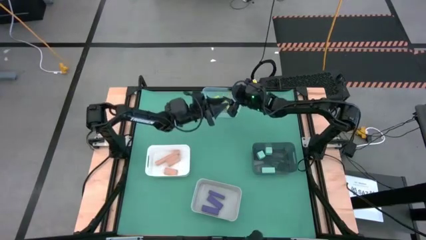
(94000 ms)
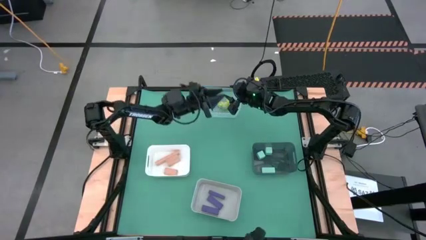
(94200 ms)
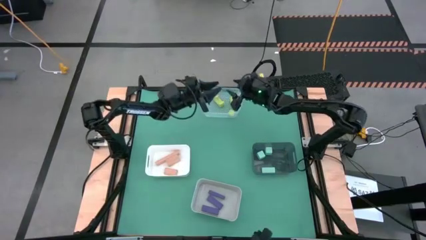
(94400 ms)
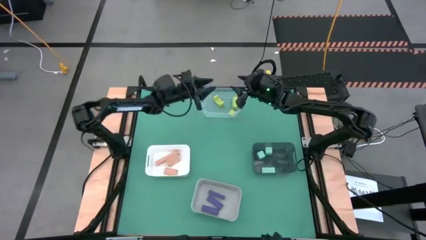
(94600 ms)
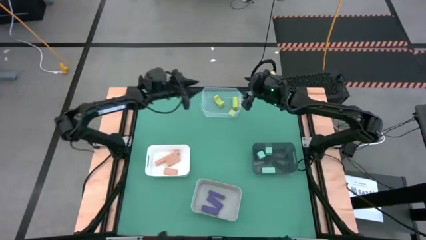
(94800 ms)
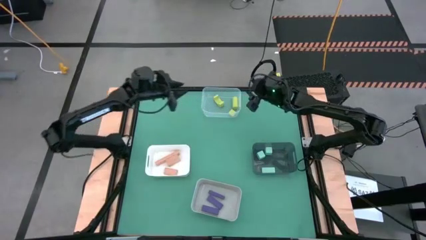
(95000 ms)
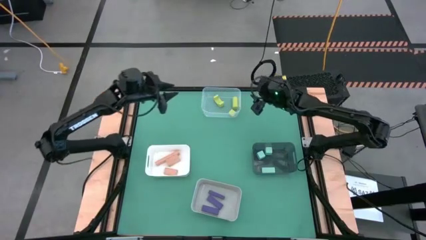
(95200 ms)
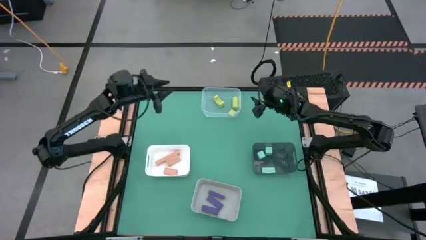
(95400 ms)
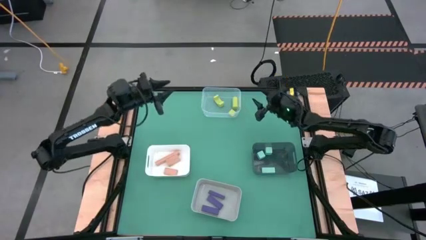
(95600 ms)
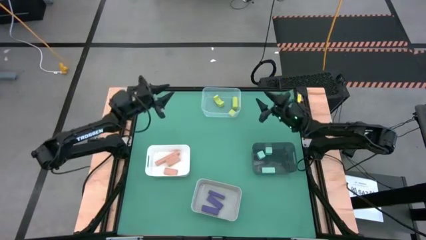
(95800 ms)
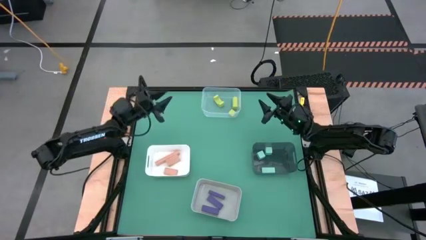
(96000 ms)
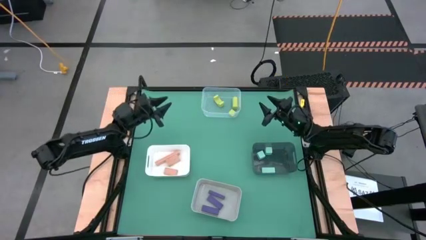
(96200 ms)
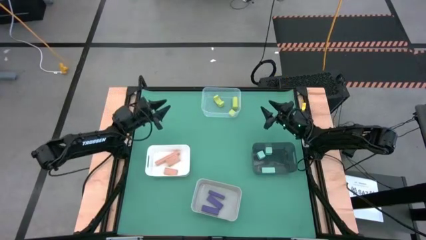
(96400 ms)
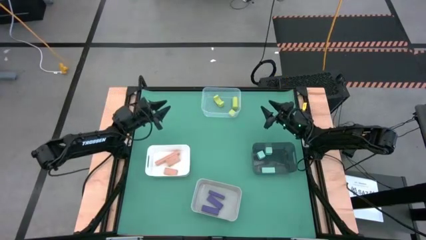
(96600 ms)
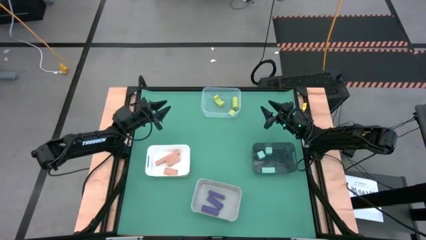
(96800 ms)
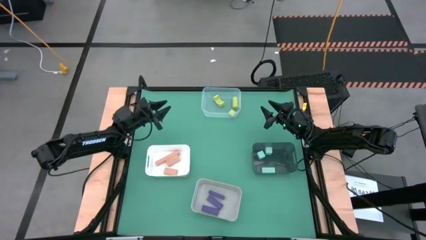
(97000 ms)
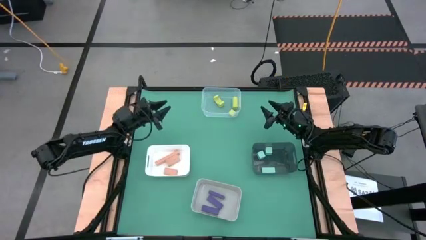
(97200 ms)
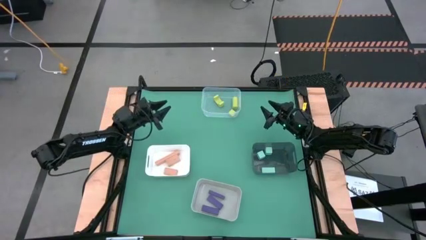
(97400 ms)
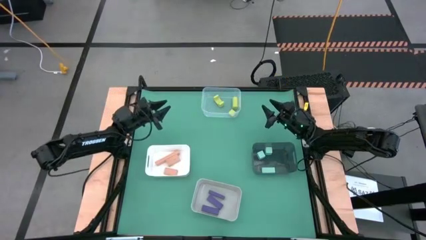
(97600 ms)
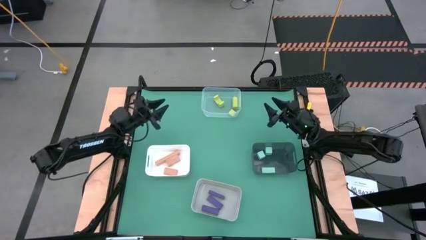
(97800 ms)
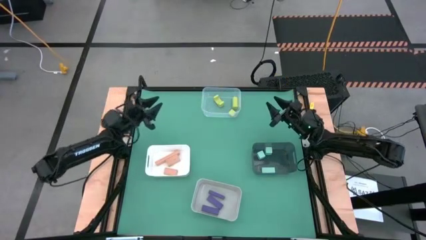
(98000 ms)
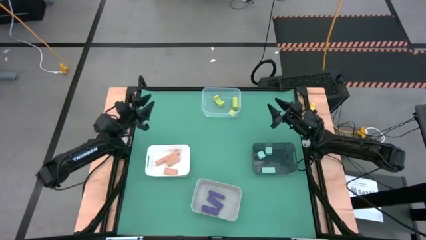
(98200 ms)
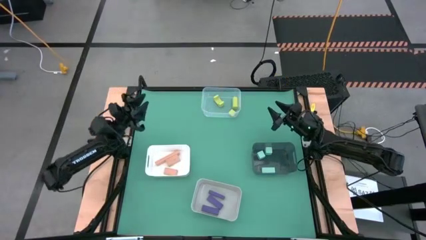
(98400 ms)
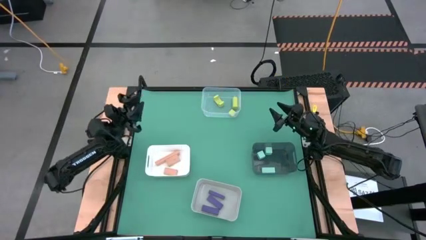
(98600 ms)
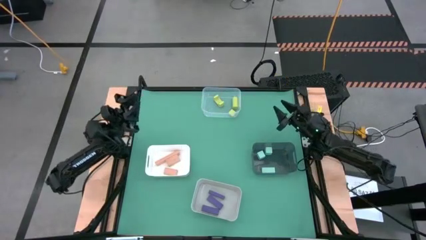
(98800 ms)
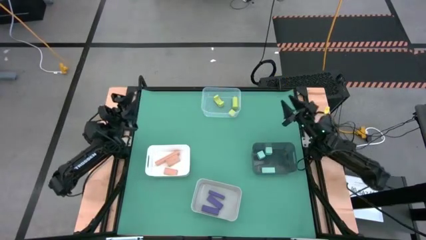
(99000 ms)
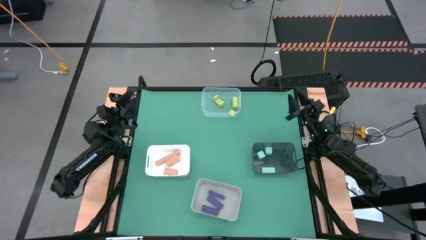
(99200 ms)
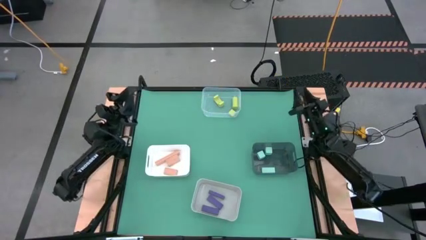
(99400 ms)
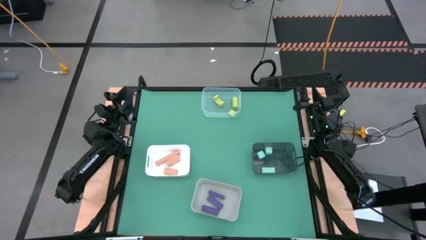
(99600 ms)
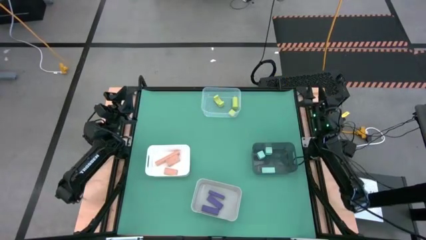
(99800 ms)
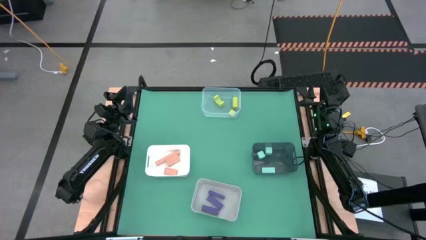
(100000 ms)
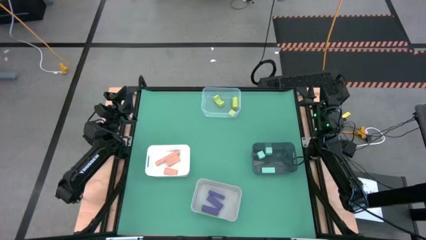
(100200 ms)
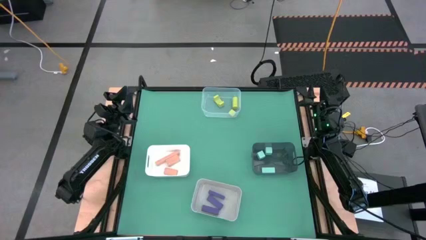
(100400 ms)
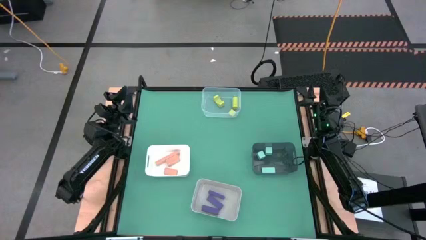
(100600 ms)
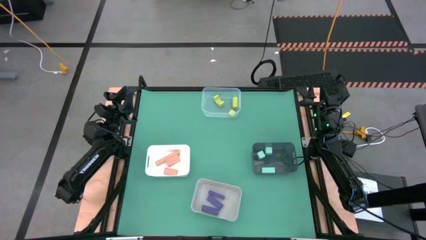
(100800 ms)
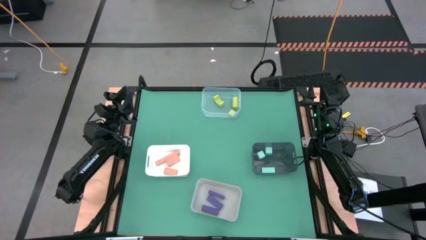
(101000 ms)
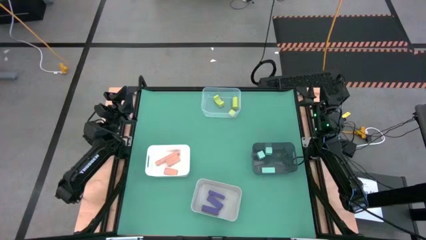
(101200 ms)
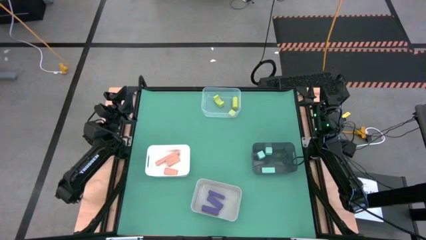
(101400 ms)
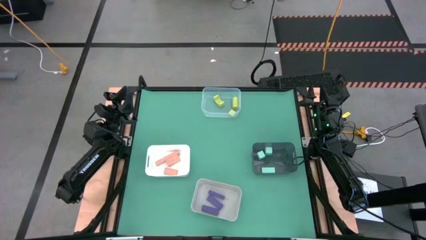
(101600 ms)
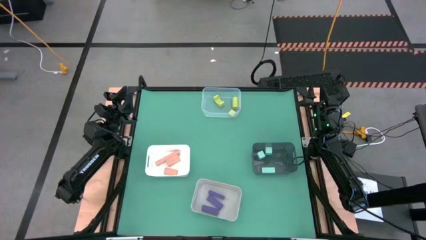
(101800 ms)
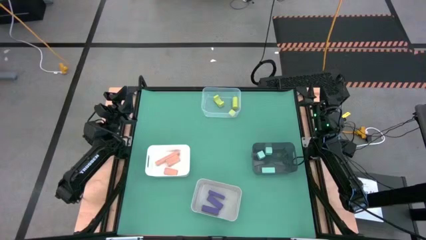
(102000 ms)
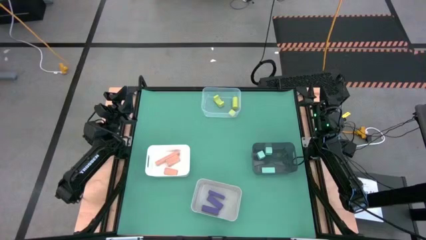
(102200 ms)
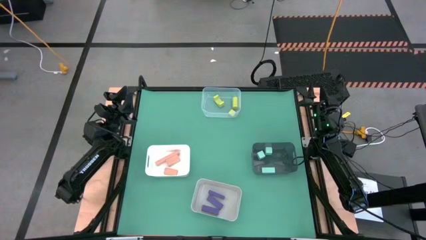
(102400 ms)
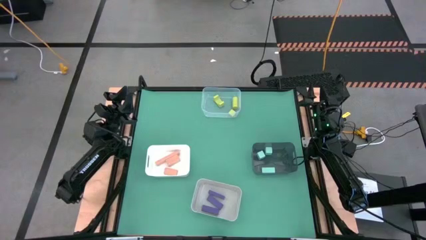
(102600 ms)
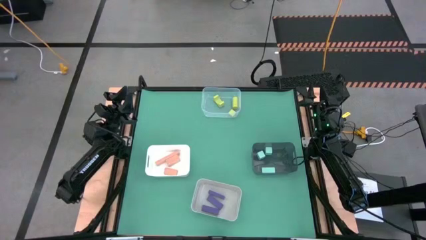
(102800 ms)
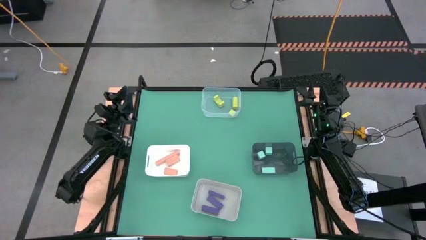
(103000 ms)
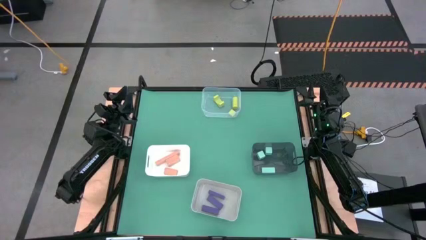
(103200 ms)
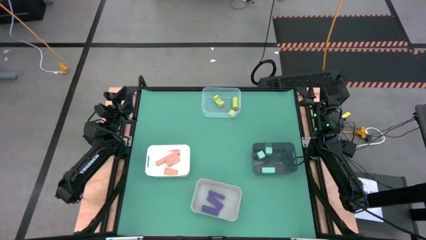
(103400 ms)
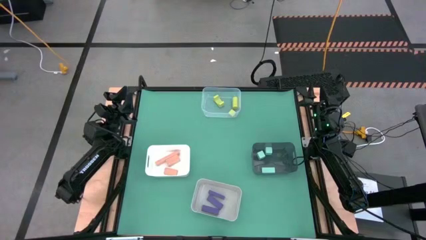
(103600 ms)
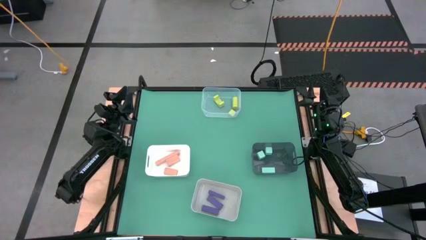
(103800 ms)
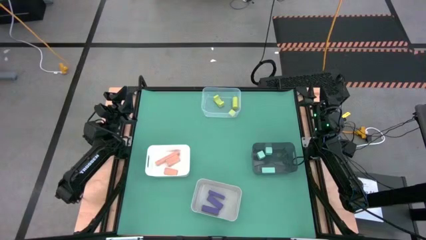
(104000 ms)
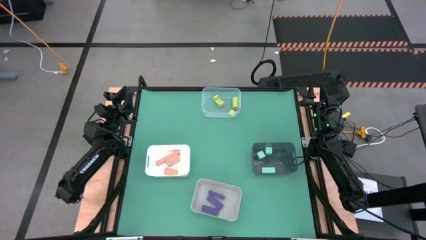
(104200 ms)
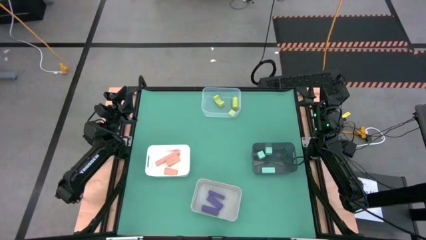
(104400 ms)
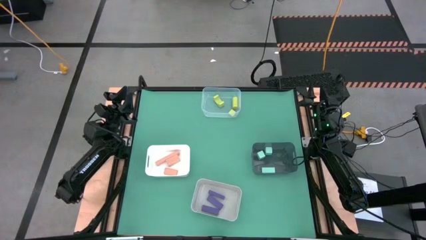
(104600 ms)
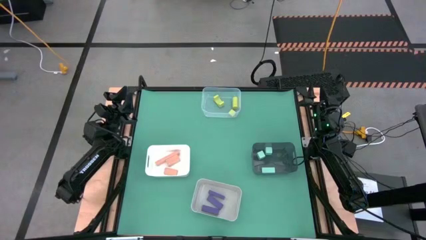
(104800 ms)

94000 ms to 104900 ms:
Task: Sort & place blocks by color
Return to home position

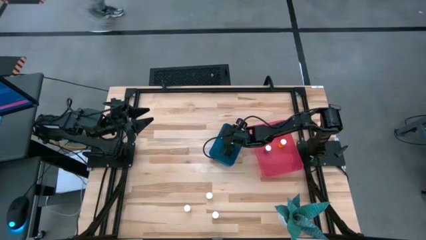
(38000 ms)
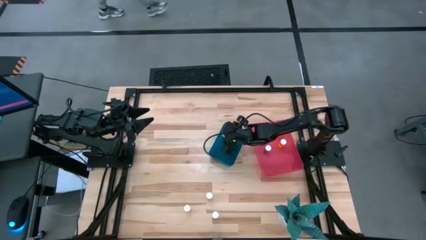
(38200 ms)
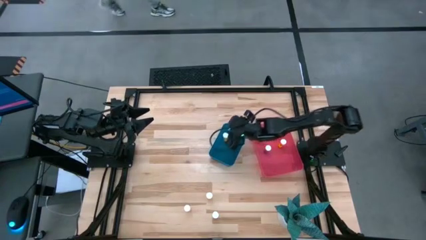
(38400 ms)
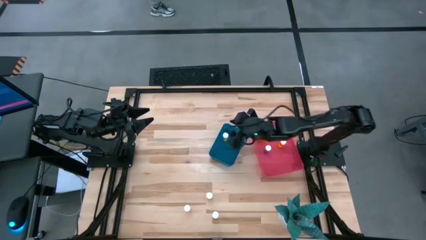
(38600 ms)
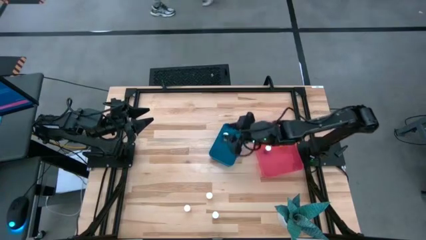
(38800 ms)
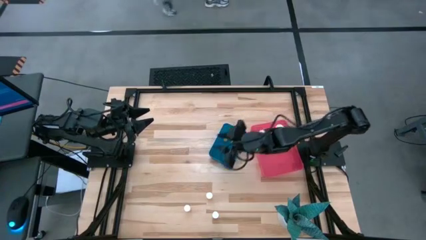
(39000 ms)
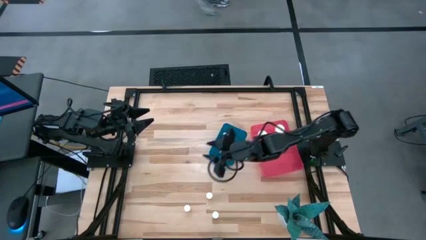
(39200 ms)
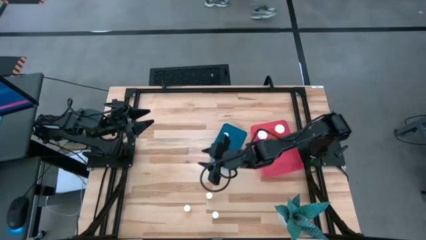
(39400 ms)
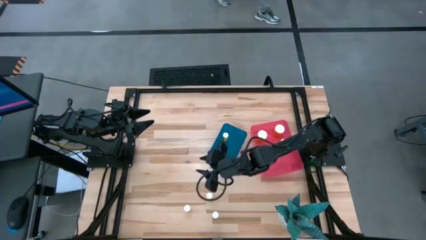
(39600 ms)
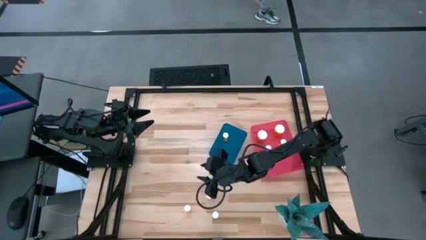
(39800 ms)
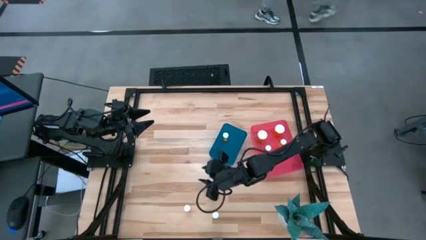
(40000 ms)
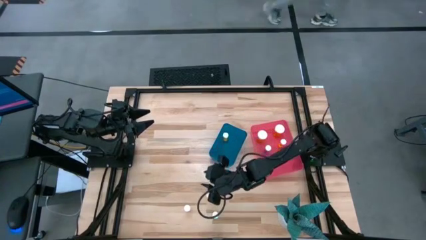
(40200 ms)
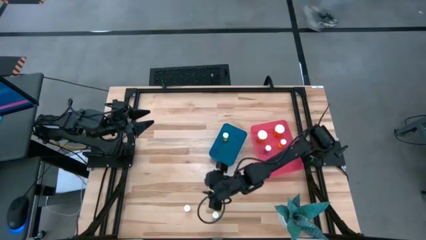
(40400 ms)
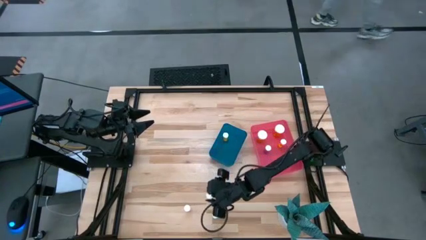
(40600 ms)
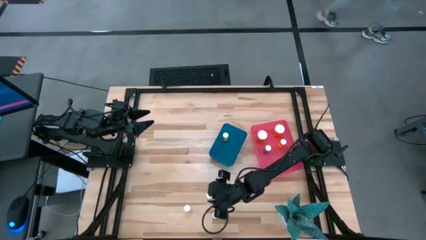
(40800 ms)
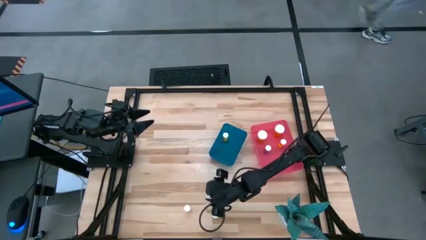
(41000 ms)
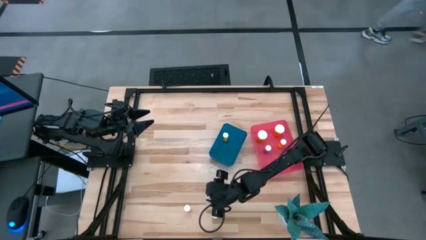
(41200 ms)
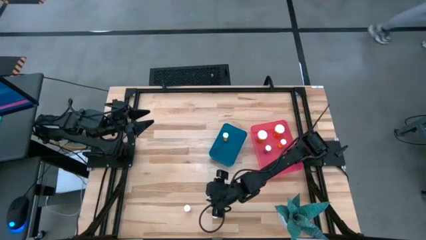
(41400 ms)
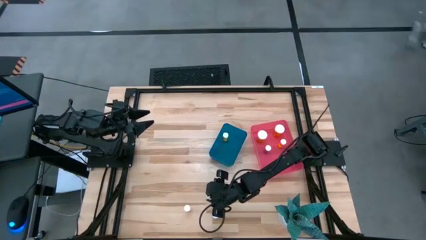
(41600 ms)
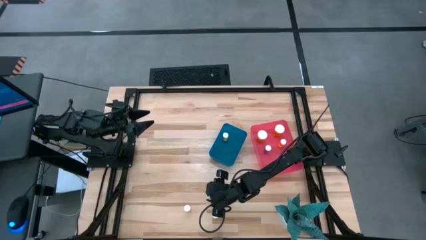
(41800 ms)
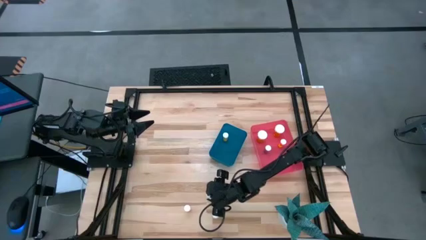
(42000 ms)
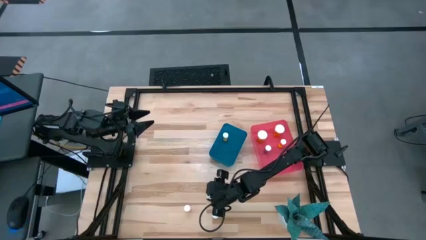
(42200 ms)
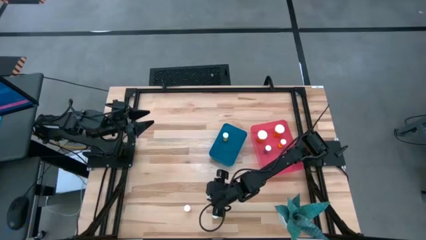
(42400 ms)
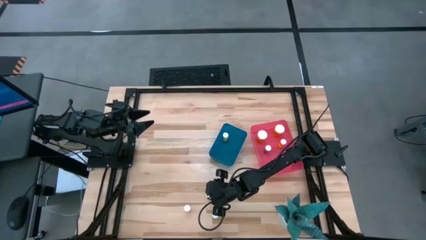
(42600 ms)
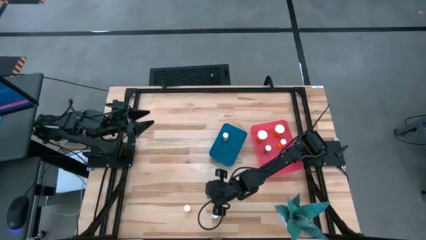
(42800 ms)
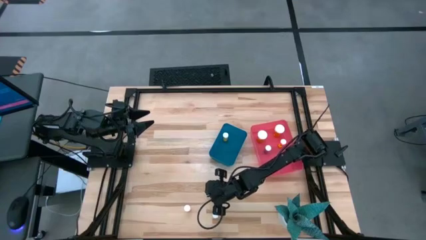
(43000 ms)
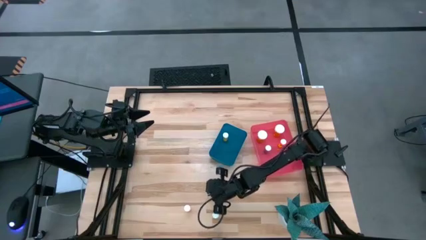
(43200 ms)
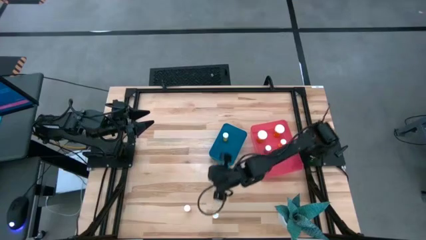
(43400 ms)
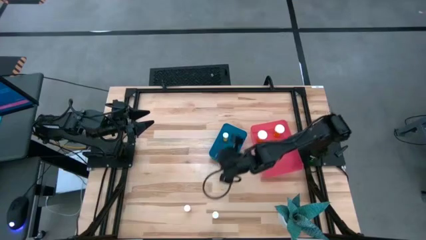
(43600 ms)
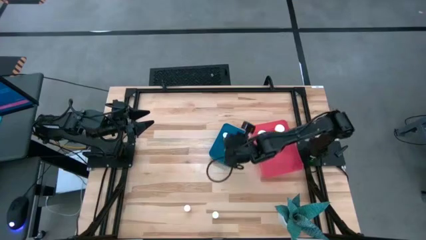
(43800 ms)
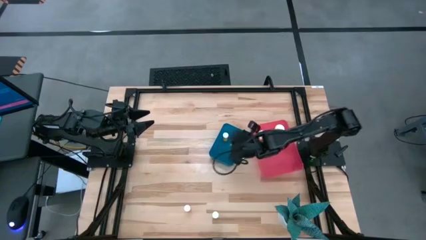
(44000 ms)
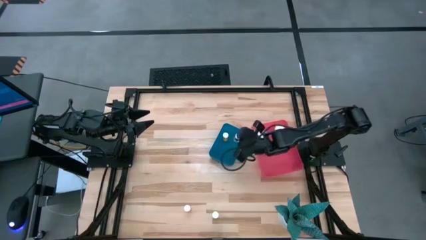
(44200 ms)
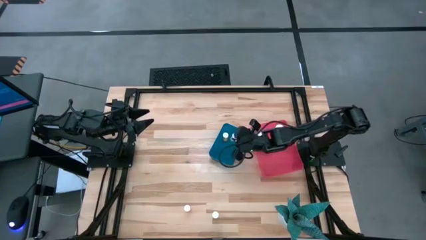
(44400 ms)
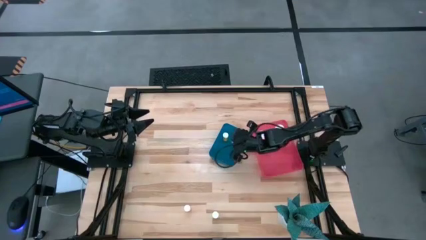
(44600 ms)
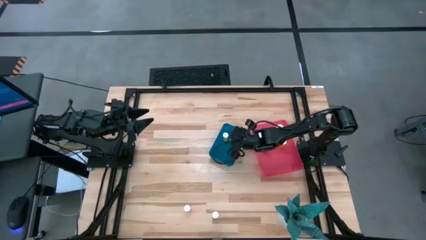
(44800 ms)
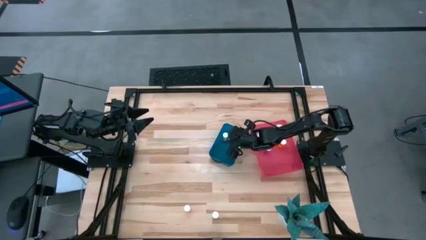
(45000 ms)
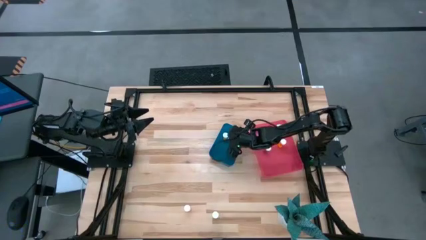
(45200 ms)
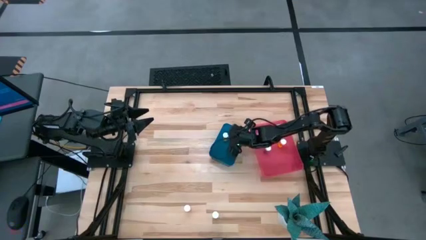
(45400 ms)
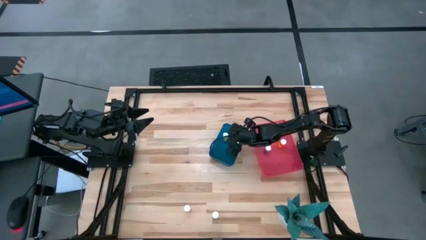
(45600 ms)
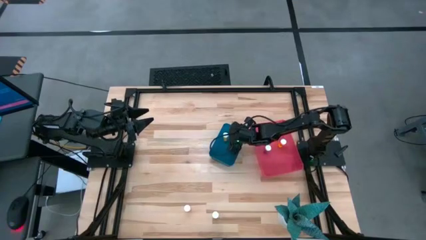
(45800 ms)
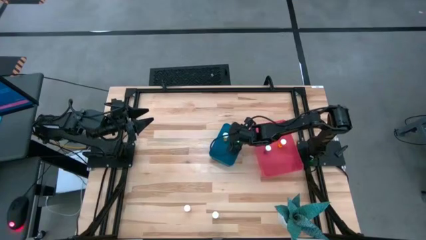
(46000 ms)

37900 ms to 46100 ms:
Task: Pick and place medicine bottles into bin by pill shape (circle, oval)
Put the yellow tablet bottle into the blue bin
